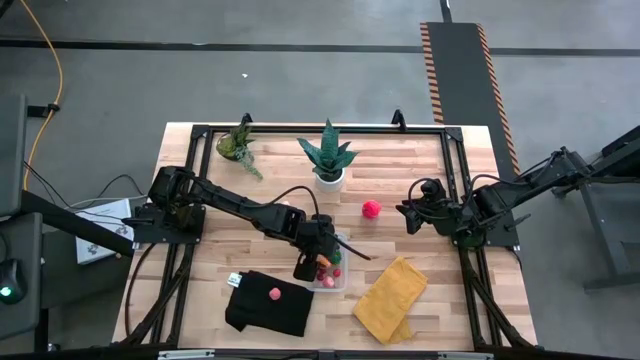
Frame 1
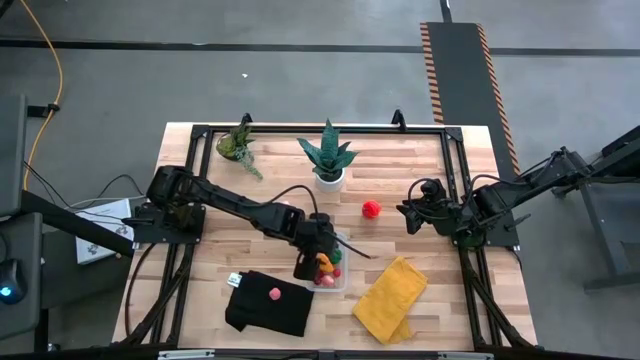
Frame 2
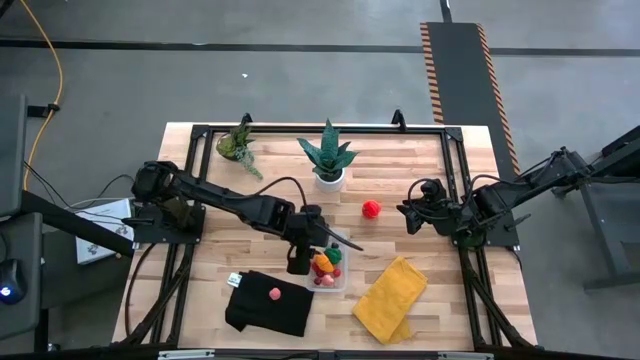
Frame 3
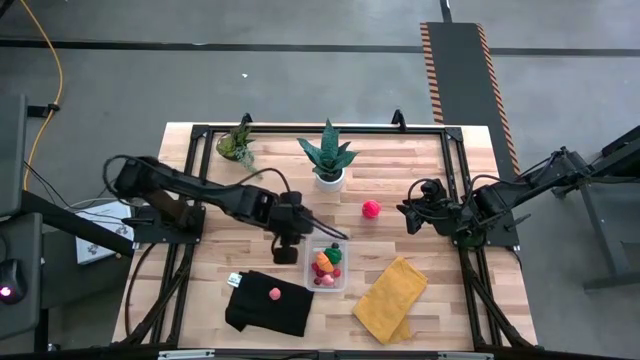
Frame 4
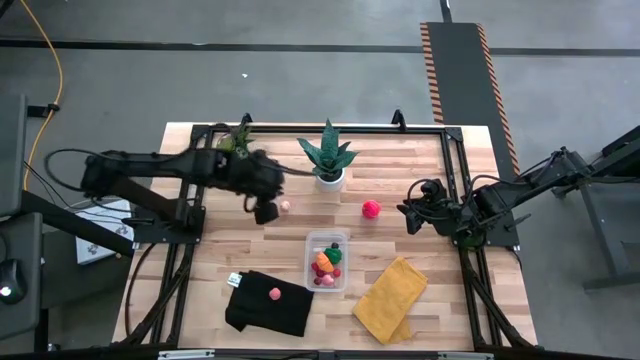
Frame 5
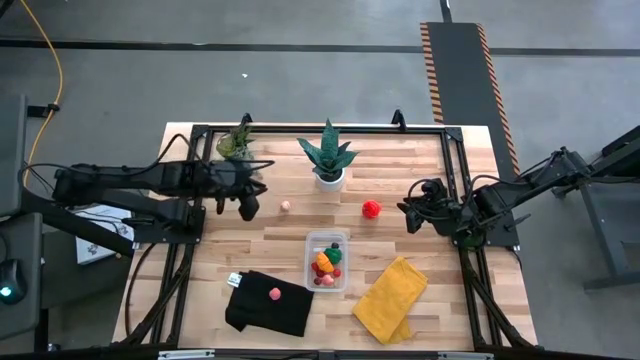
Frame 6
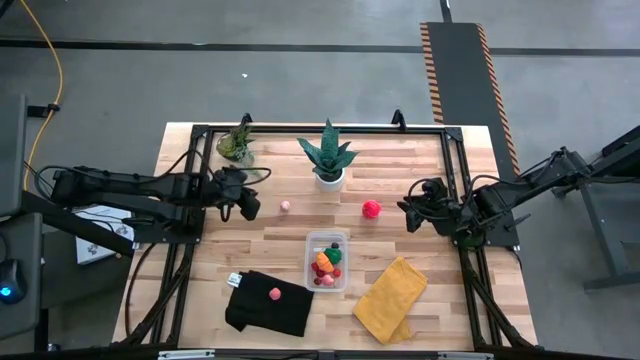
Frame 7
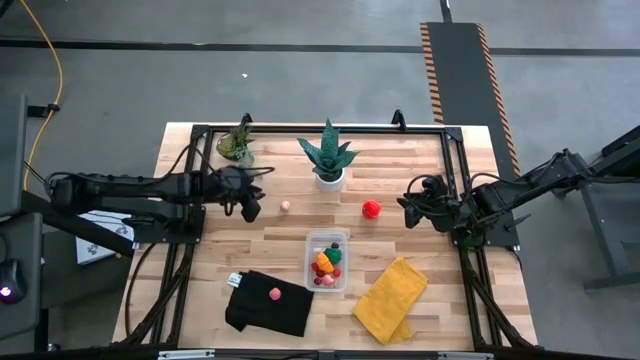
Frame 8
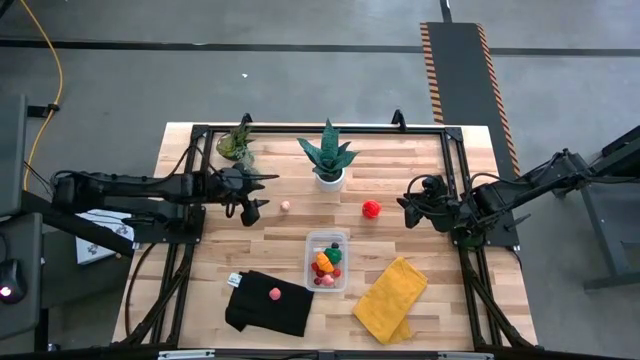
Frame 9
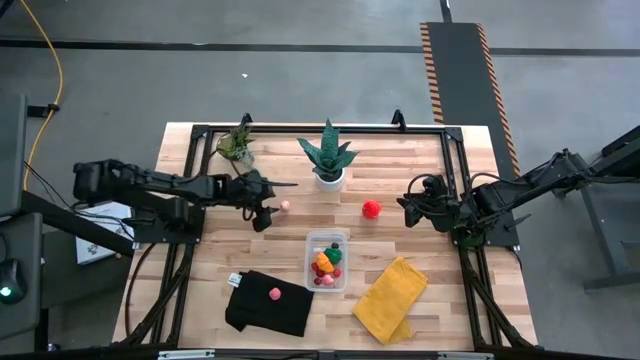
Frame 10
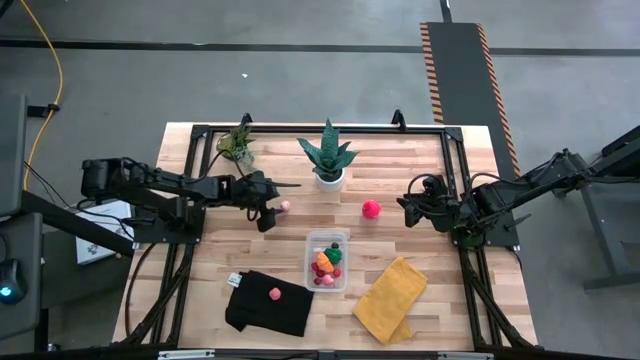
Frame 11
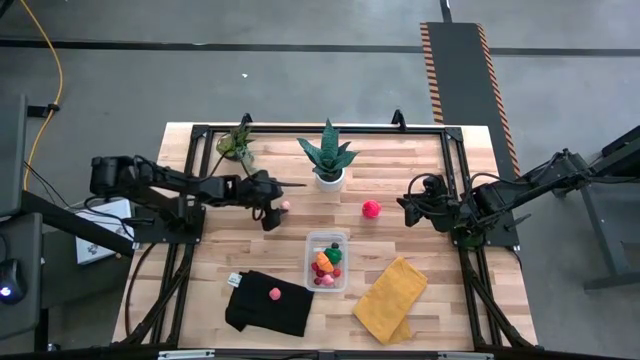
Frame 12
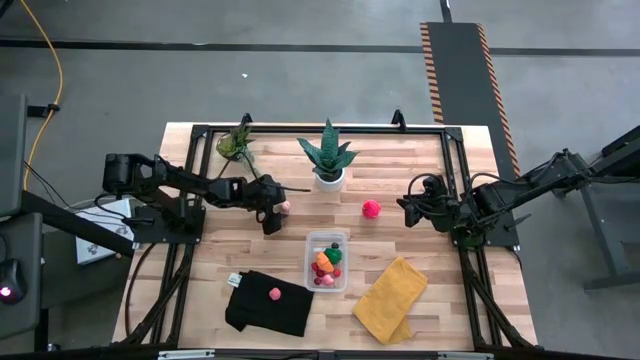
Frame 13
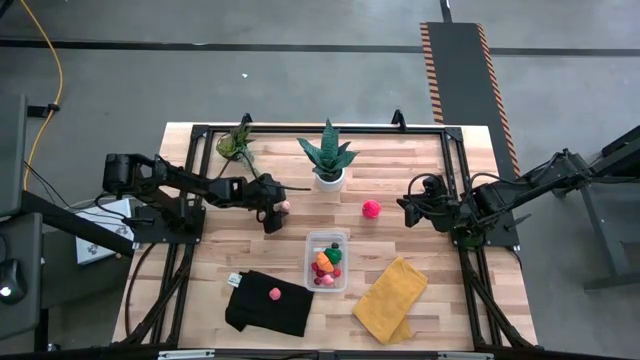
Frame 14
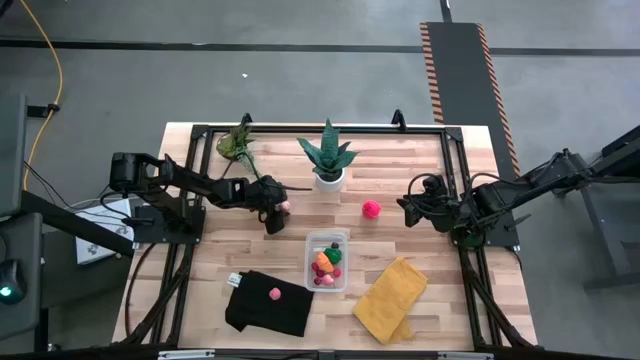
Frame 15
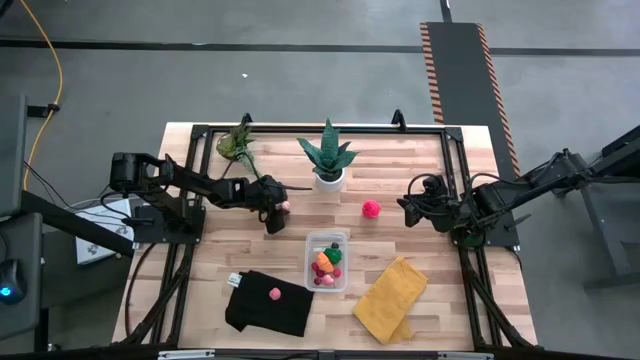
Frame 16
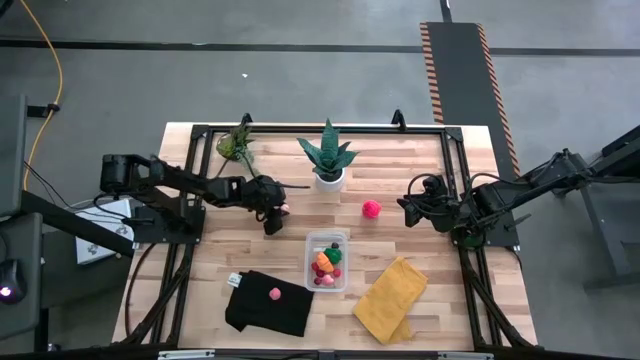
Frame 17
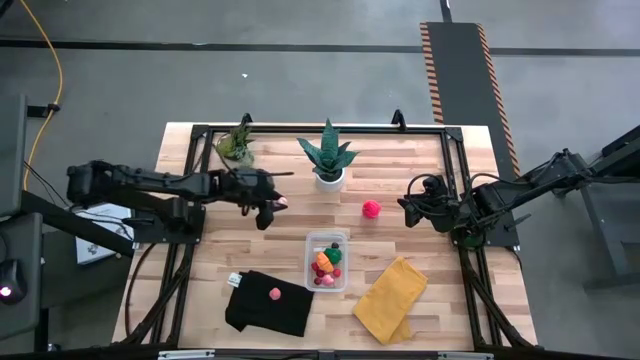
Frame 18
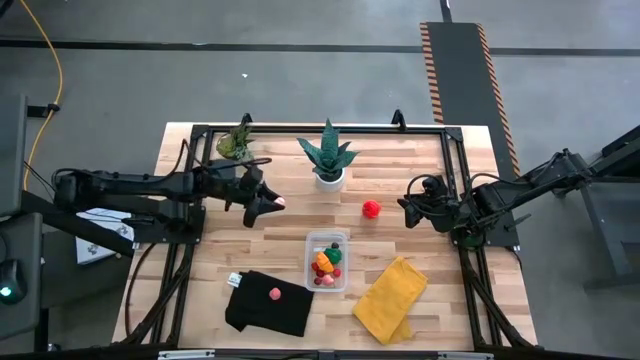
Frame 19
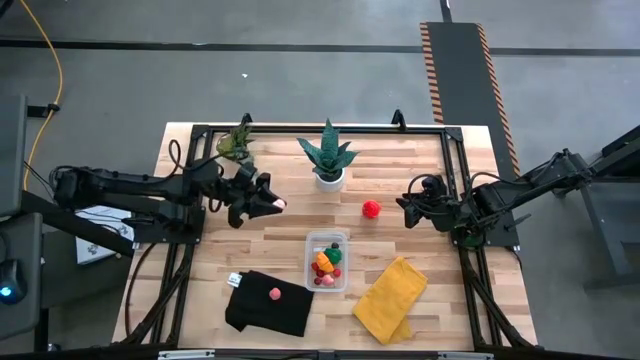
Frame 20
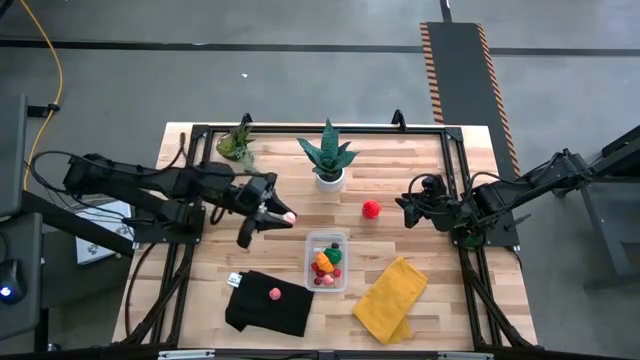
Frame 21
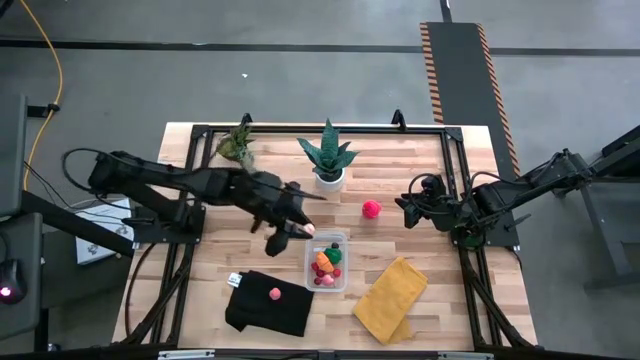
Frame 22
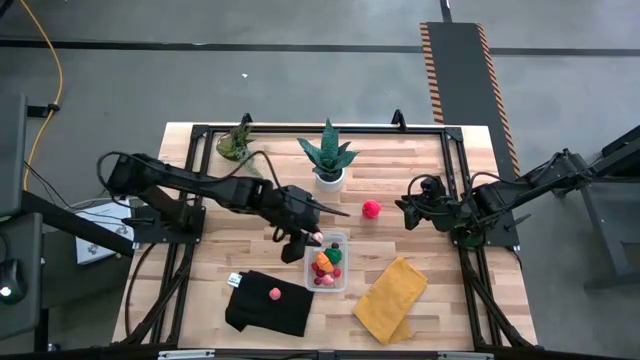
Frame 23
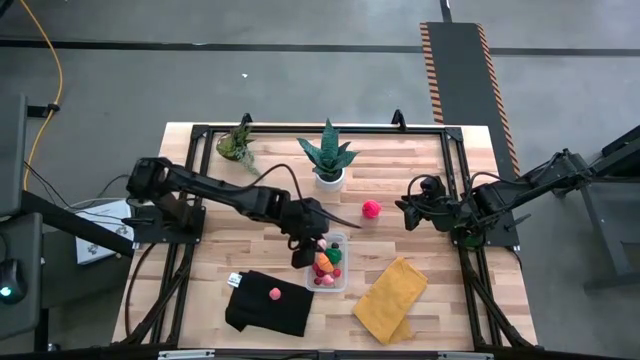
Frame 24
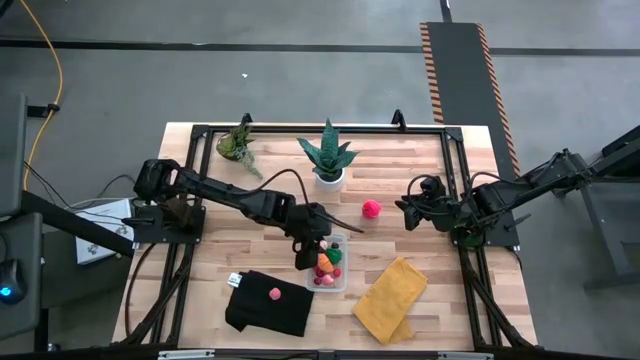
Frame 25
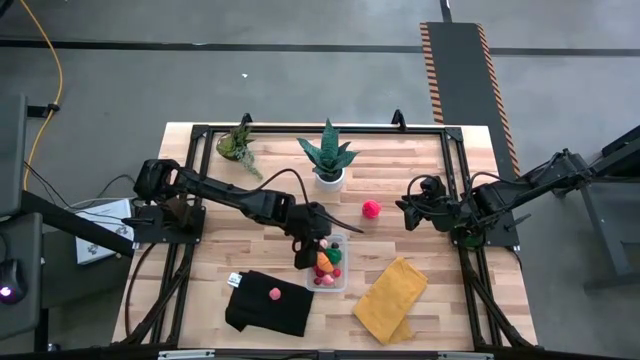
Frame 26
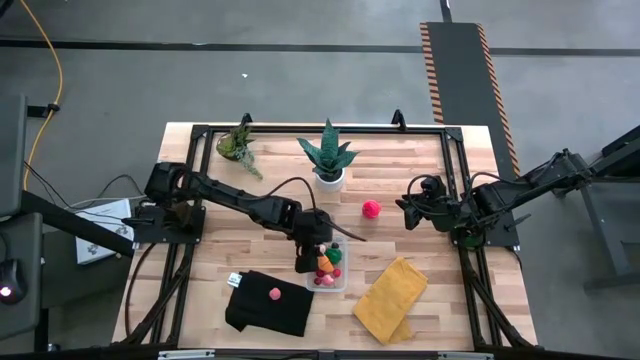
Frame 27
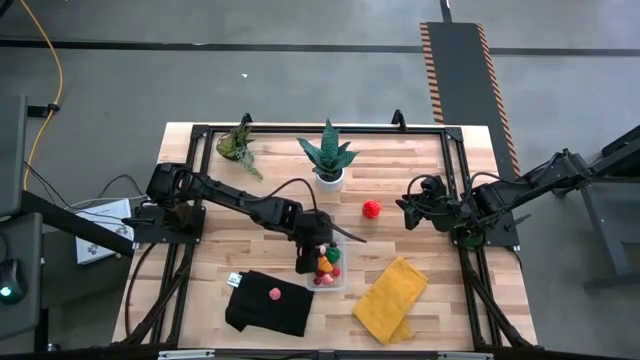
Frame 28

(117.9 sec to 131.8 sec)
Task: Pick and placing Produce into tupperware
Put the top apricot into the transparent container

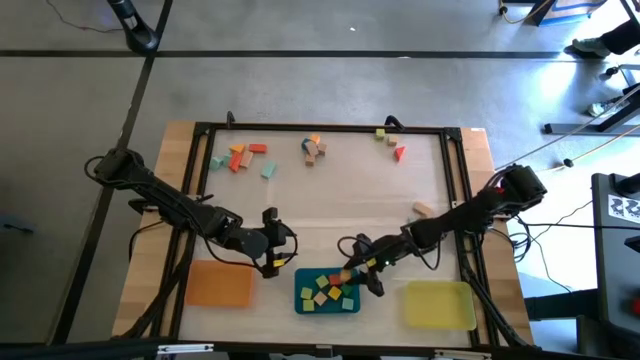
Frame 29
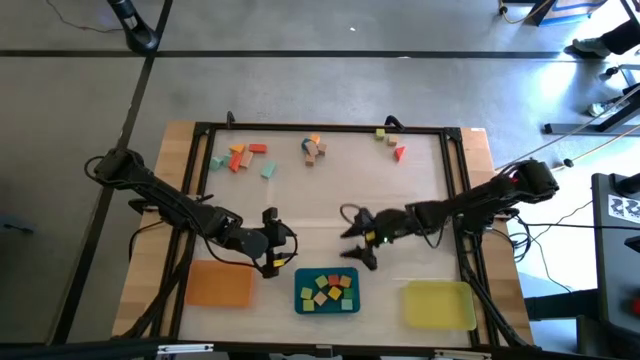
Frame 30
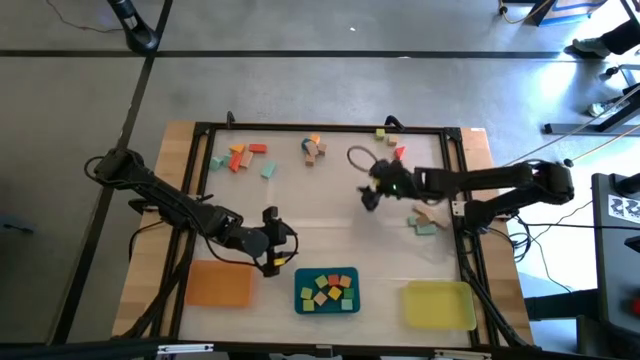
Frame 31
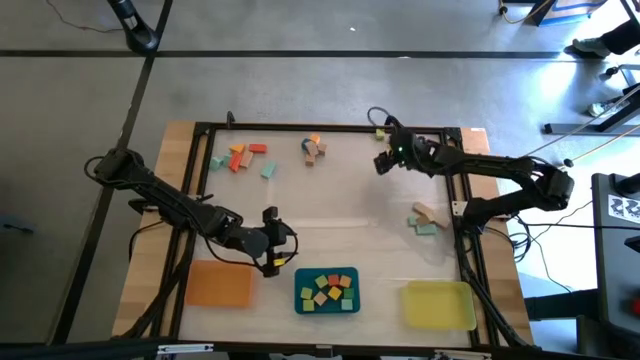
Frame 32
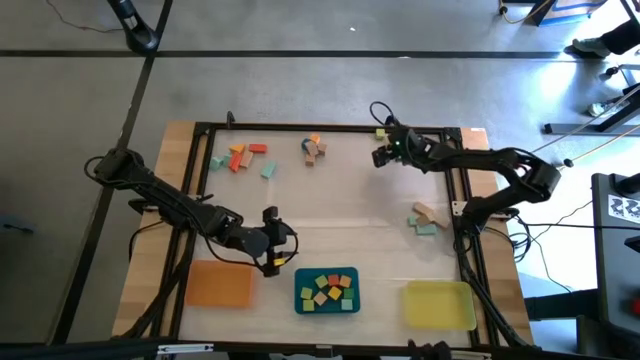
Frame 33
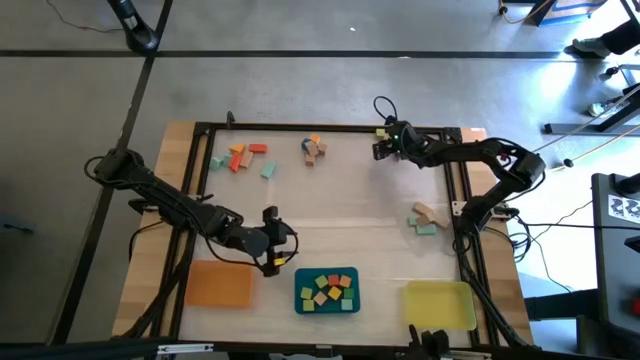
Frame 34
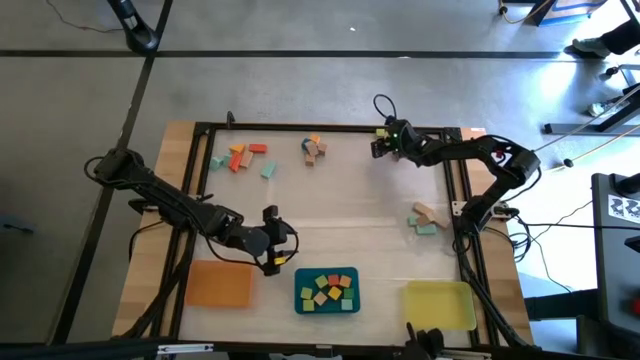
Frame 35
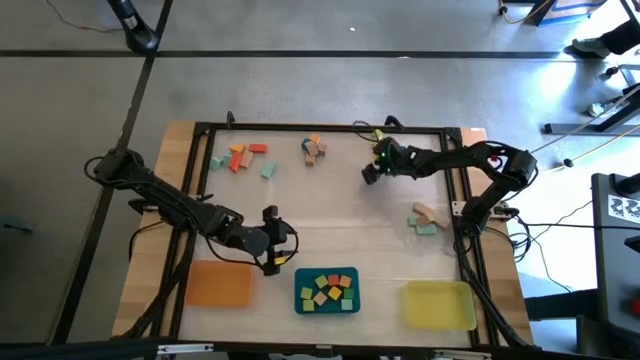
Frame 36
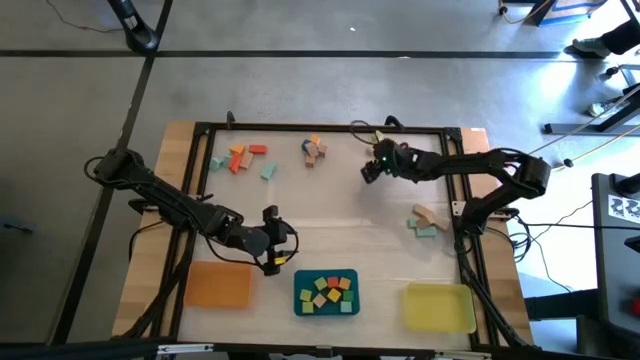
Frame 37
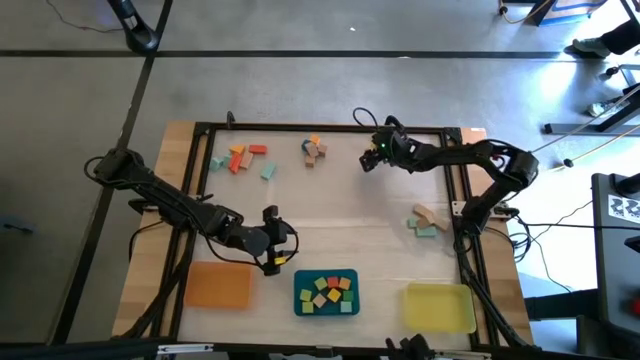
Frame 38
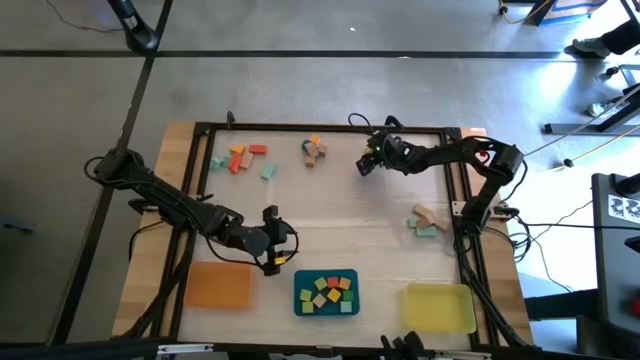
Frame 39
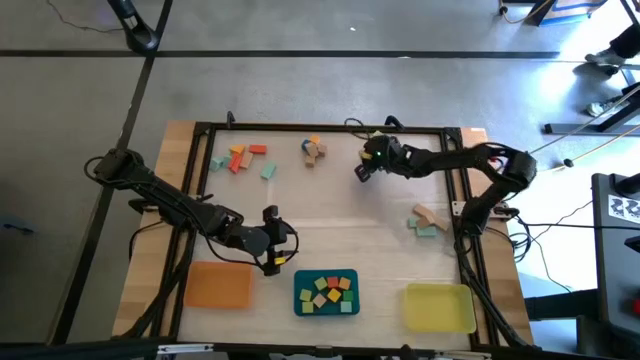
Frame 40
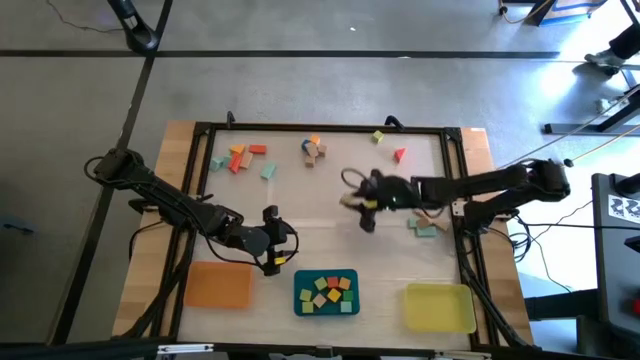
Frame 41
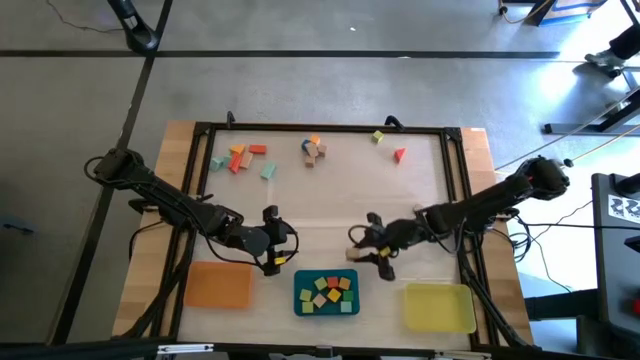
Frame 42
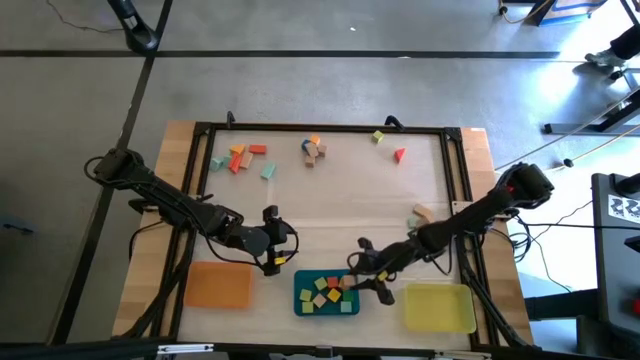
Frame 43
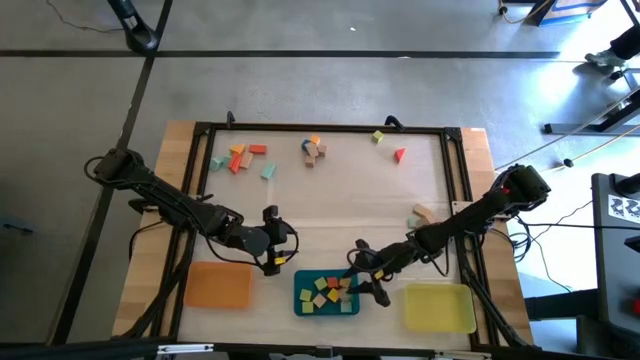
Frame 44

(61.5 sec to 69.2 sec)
Task: Sort blocks by size
Put the brown cube block into the blue bin
